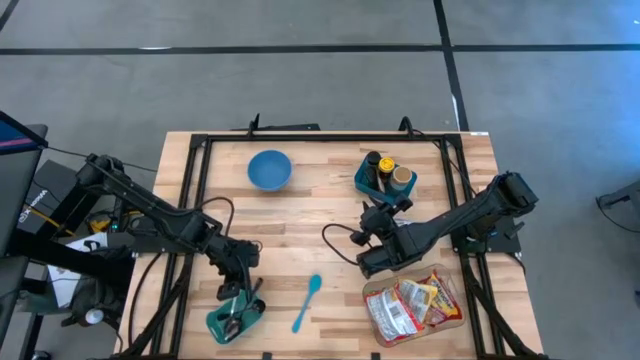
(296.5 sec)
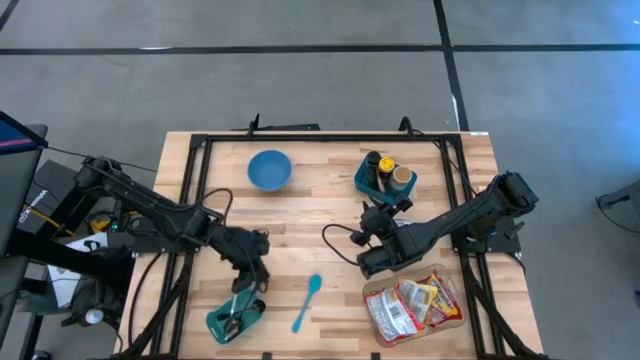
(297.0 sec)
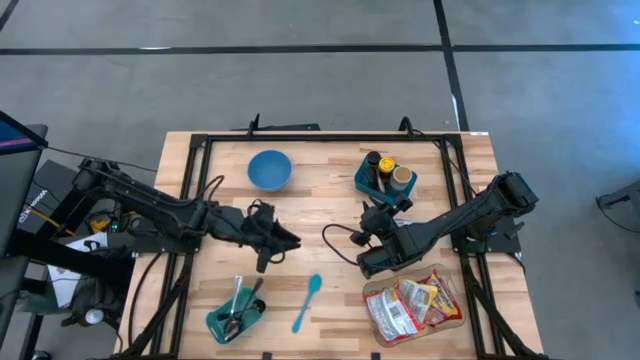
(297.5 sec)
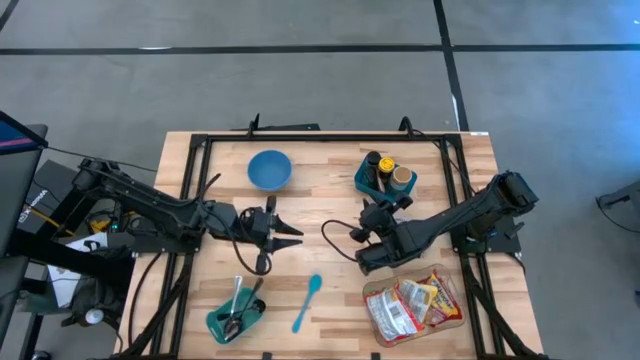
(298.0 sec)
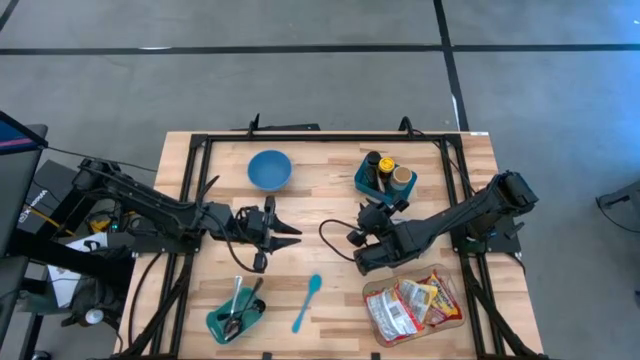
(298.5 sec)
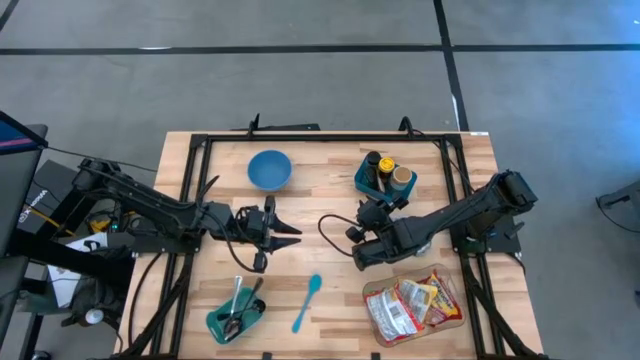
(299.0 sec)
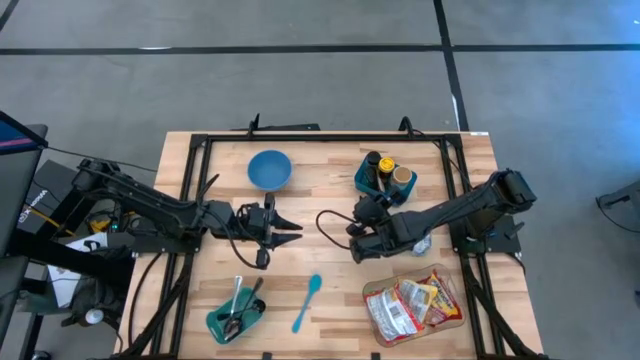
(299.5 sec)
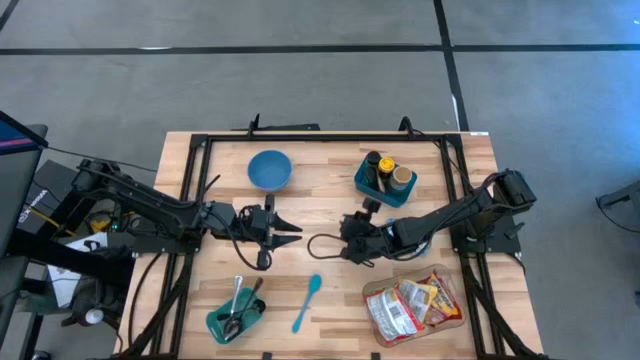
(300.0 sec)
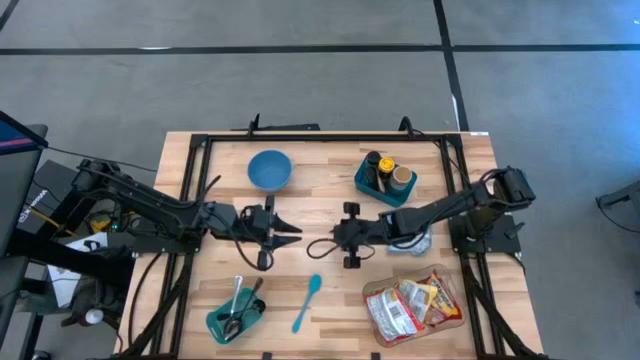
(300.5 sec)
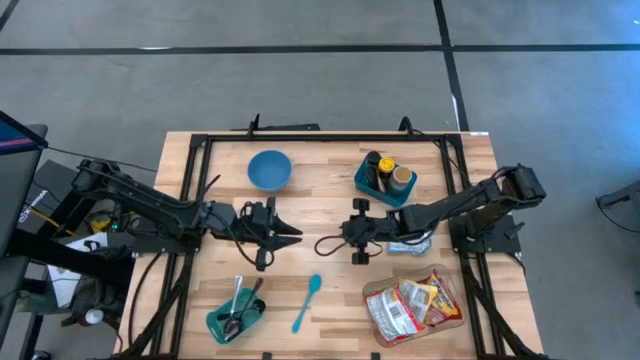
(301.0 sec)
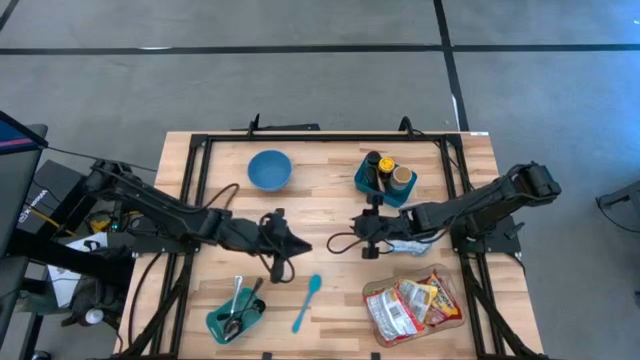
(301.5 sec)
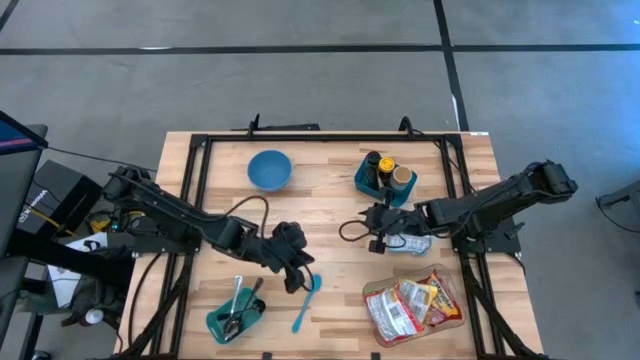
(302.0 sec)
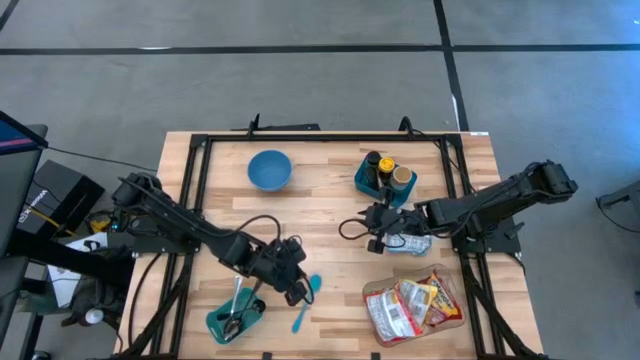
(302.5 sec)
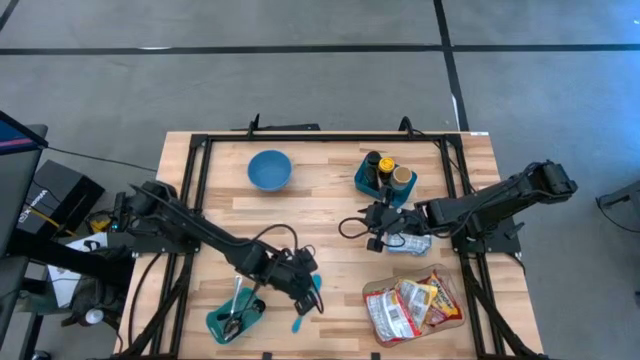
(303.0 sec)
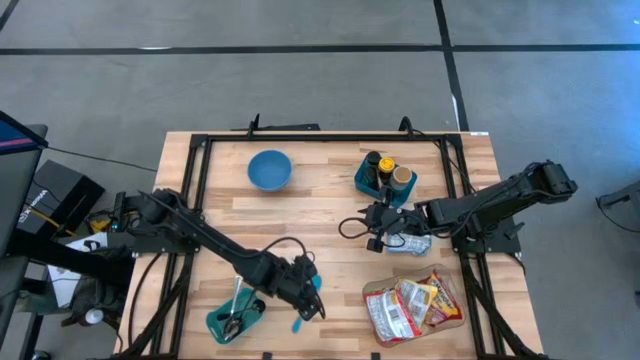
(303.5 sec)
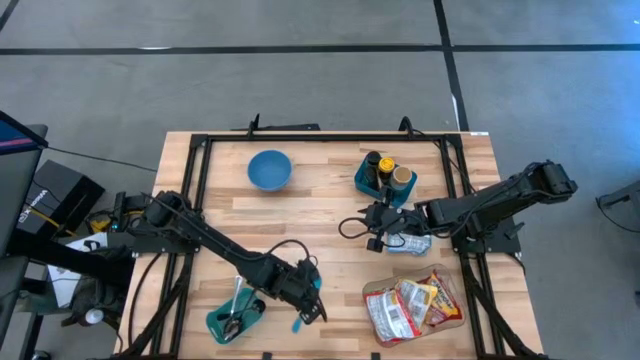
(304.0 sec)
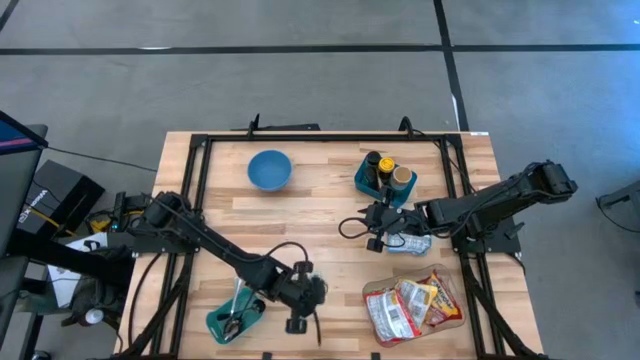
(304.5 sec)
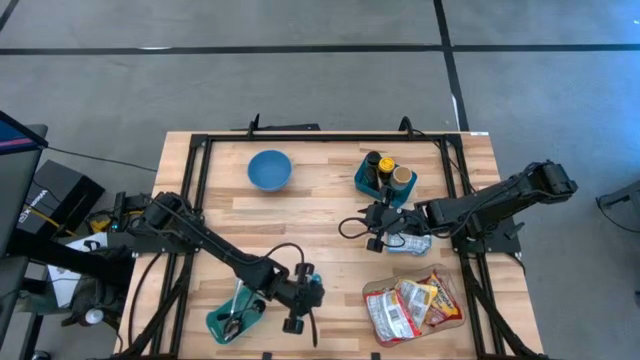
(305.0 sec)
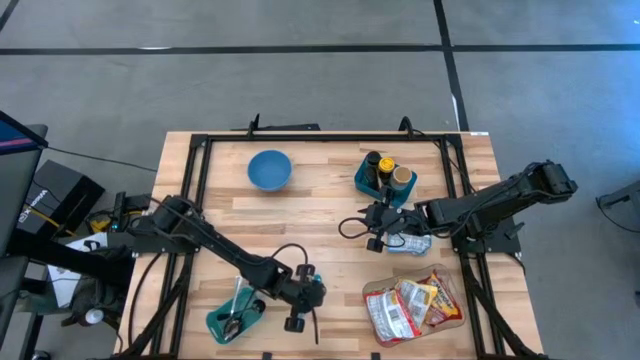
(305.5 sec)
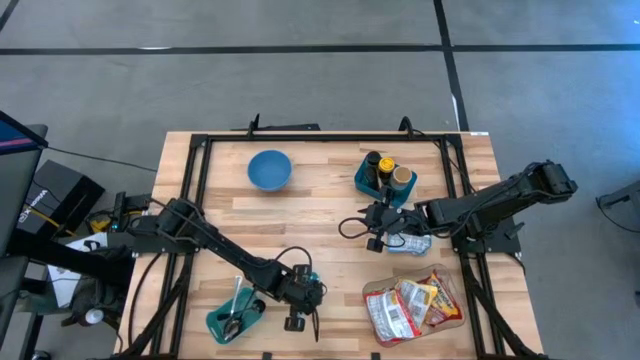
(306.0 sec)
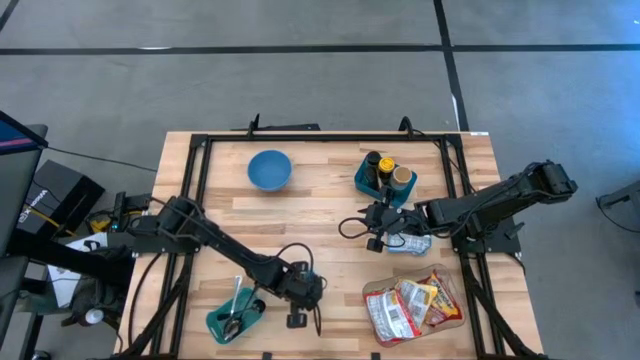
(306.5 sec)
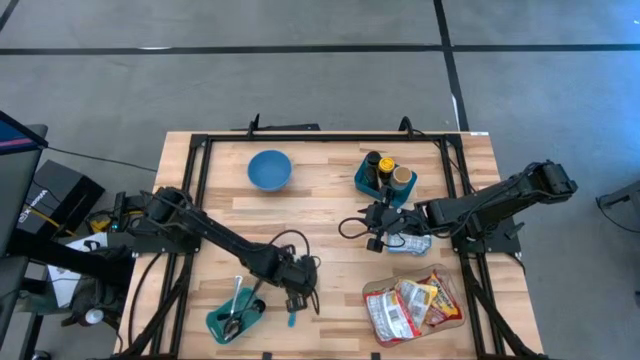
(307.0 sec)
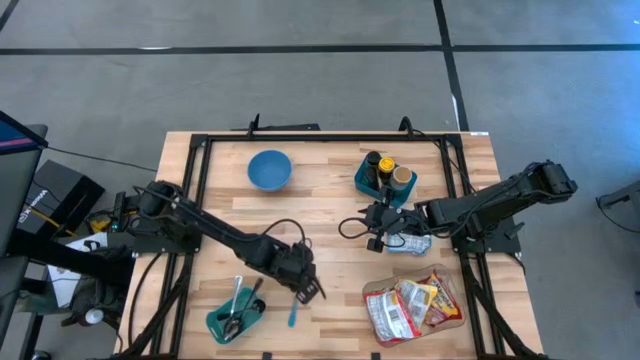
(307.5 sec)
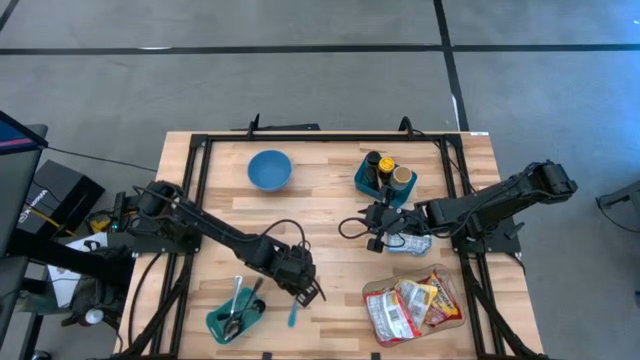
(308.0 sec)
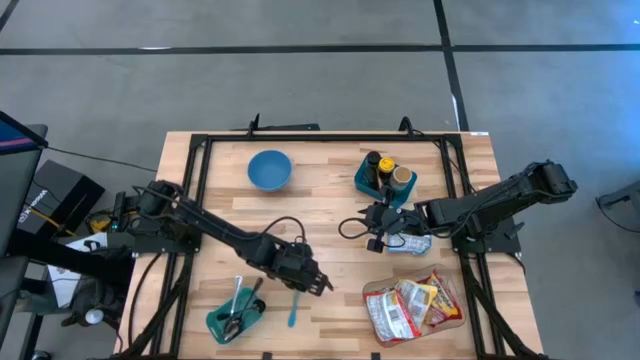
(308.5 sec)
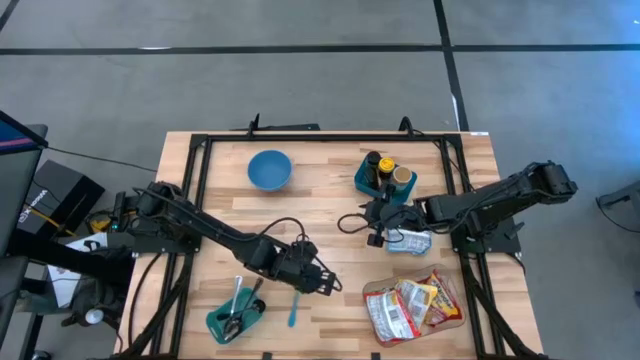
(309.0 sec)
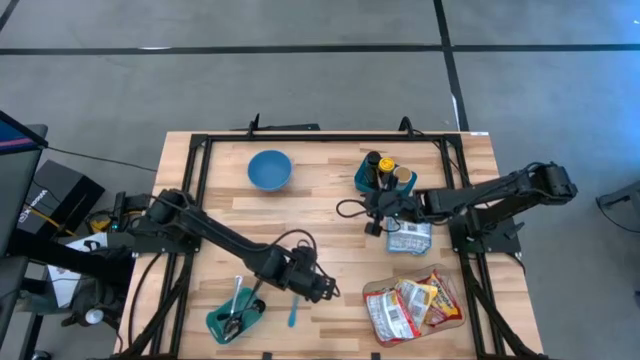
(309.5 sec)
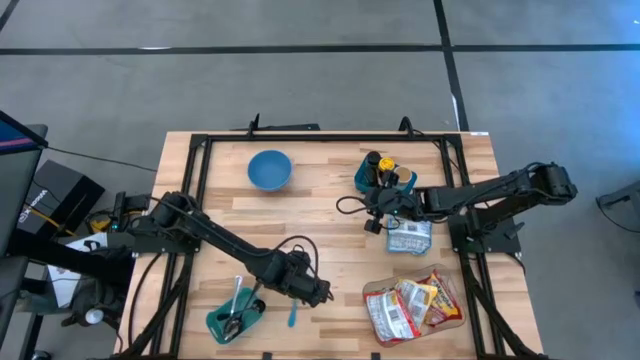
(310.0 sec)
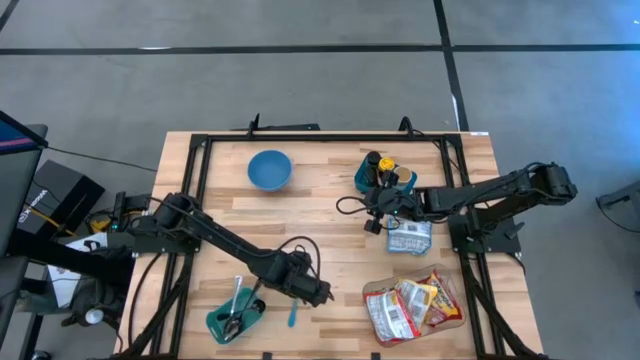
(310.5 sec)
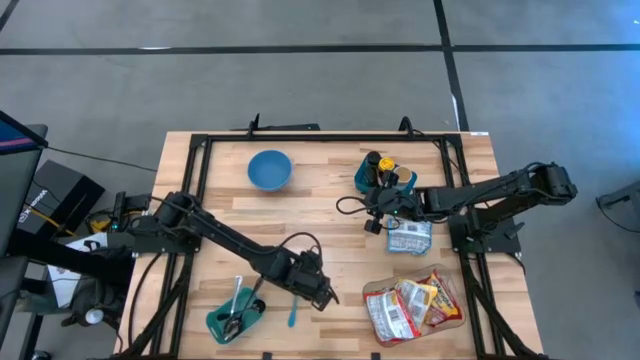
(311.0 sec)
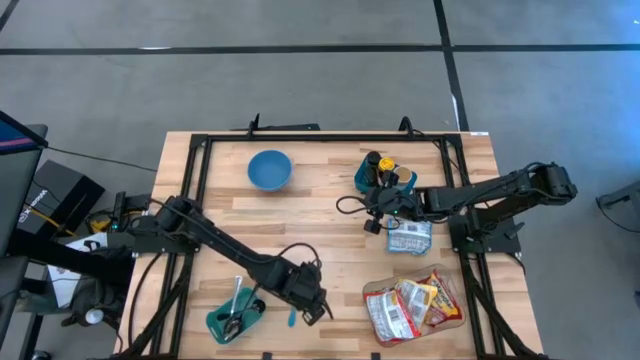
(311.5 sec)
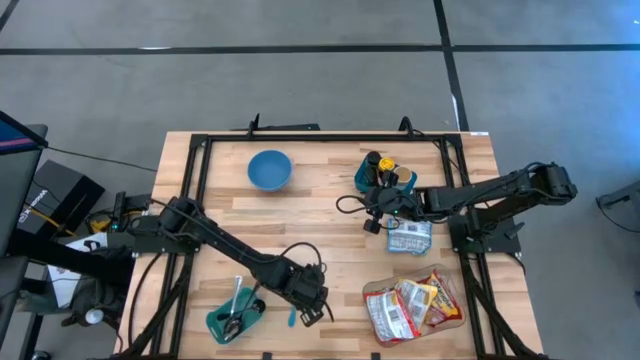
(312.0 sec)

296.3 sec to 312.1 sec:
Task: Pick & Place Food Item
Put the blue spoon into the green bin

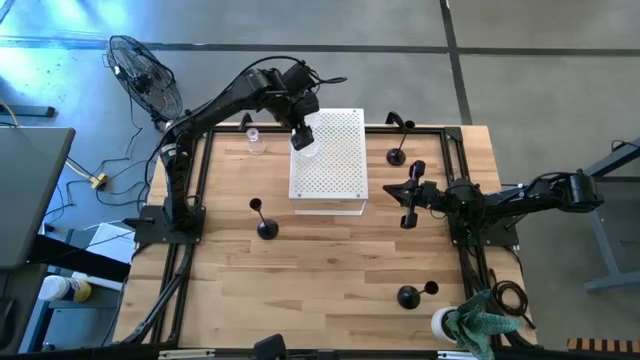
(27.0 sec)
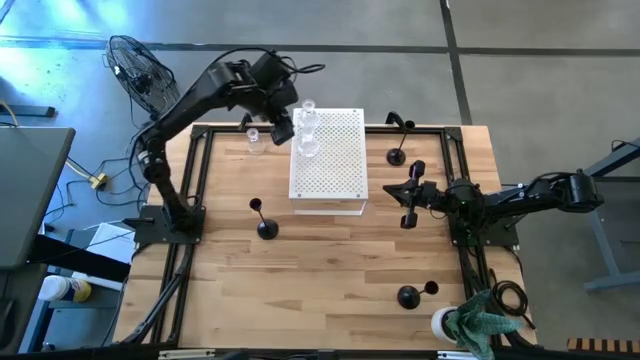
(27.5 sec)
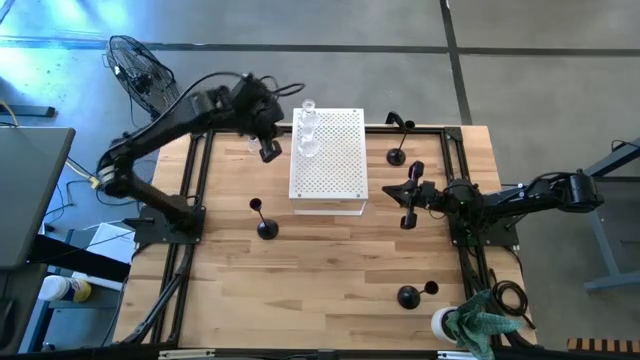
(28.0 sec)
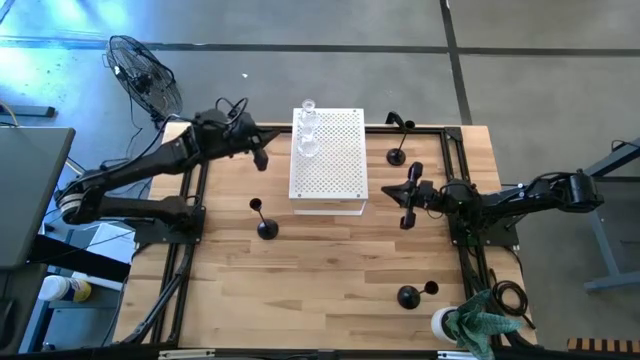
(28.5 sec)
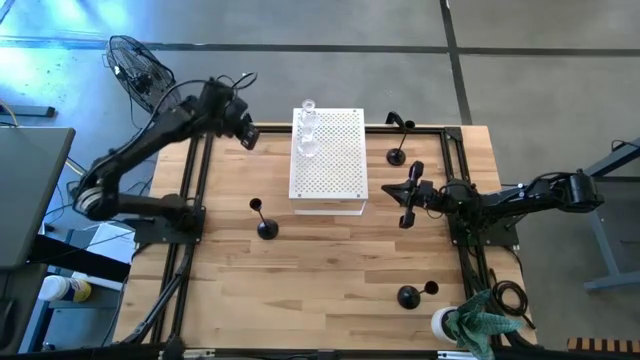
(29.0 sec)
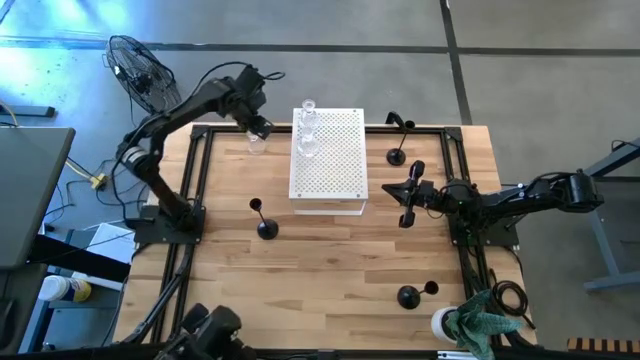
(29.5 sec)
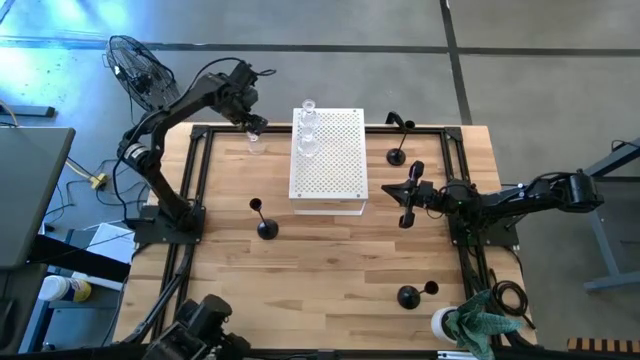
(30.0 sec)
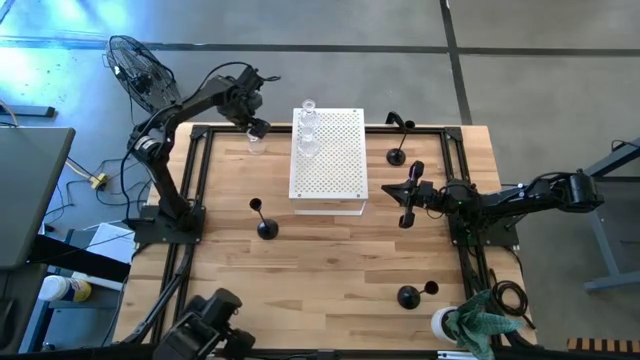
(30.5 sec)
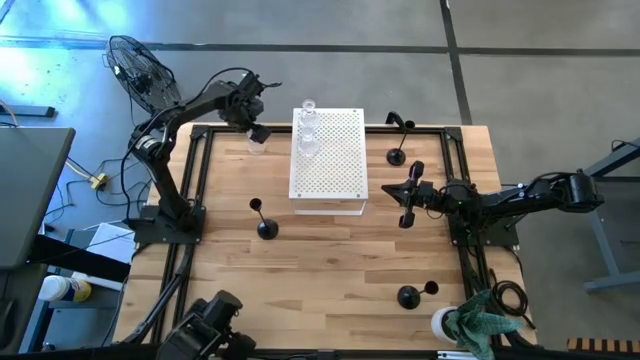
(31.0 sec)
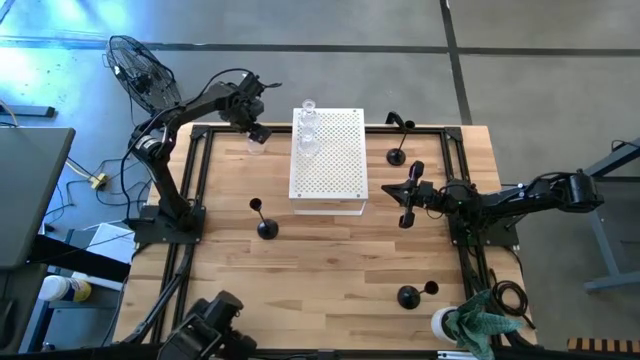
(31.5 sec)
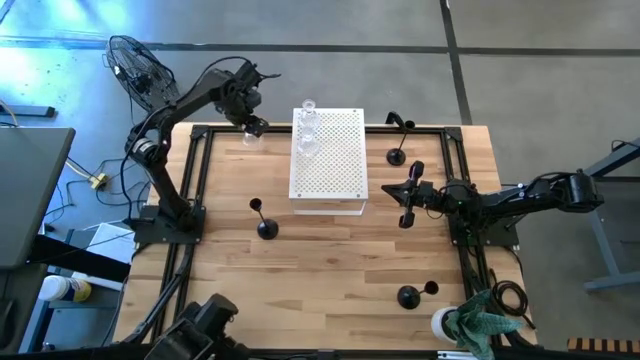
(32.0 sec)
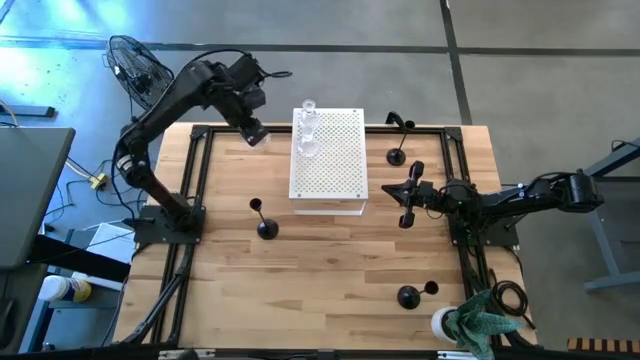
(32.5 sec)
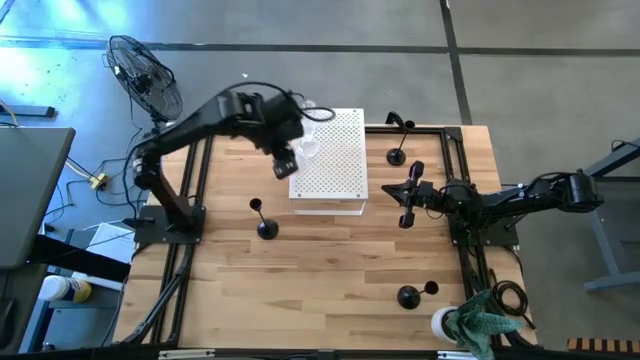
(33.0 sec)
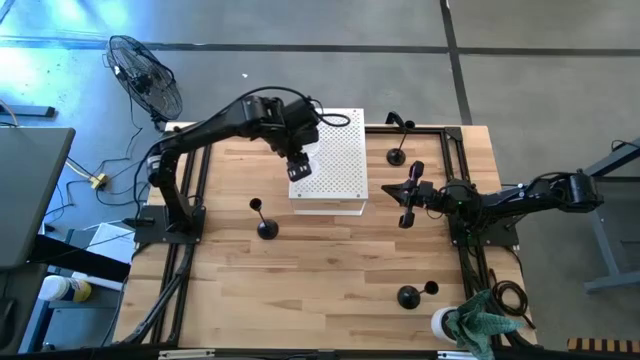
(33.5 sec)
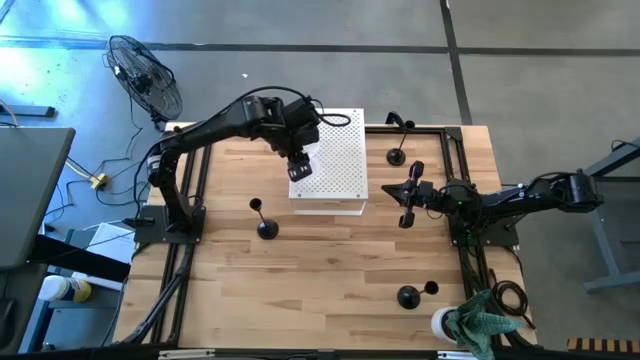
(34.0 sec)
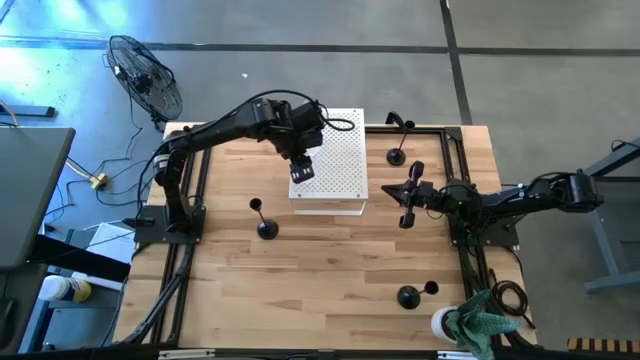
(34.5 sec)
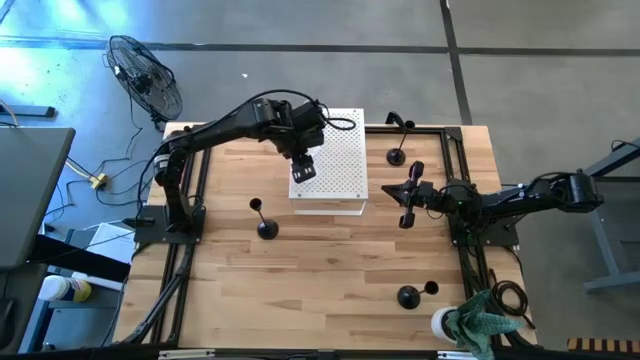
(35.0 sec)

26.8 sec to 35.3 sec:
Task: Pick & Place candle stick holders
Put the transparent candle holder on the shelf aligned with the other transparent candle holders
